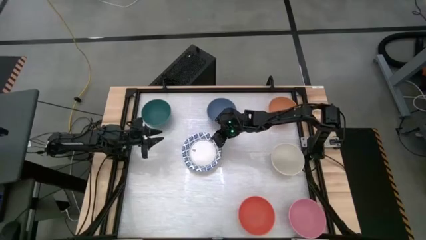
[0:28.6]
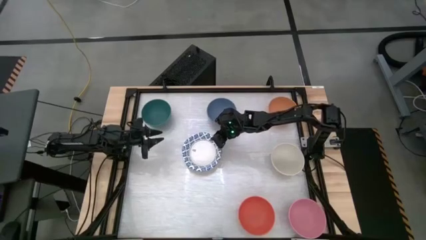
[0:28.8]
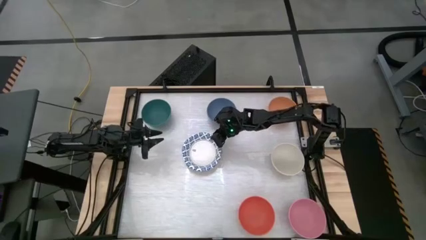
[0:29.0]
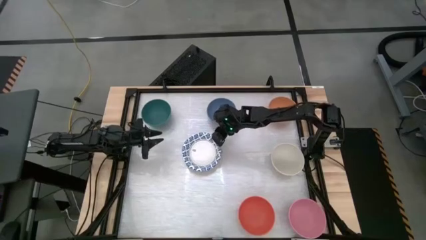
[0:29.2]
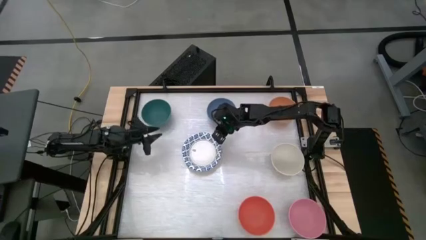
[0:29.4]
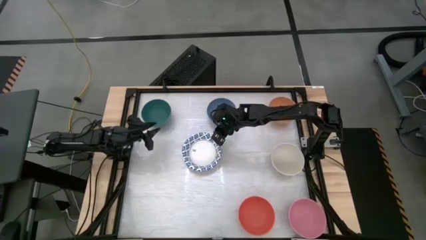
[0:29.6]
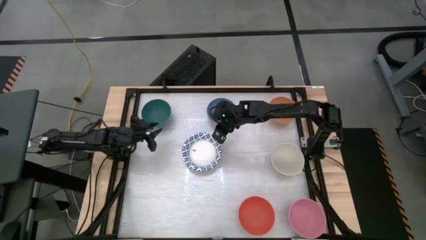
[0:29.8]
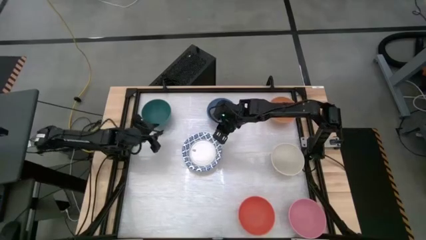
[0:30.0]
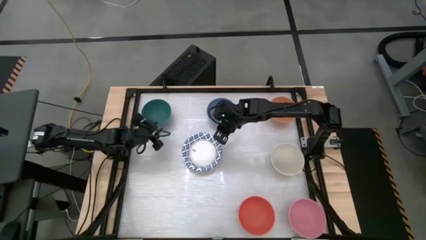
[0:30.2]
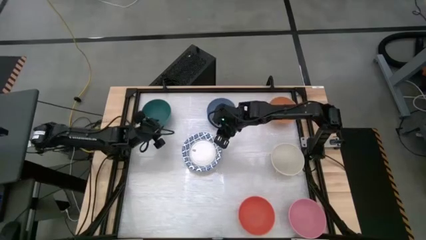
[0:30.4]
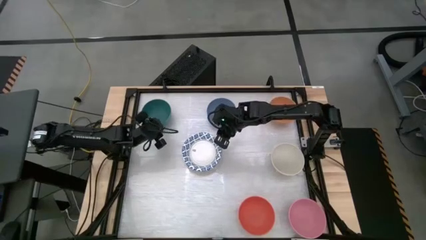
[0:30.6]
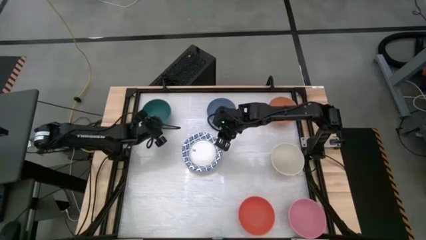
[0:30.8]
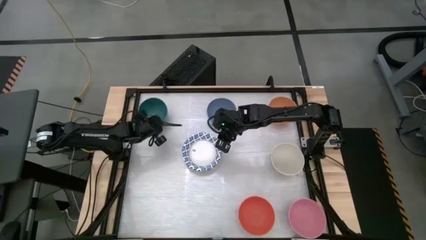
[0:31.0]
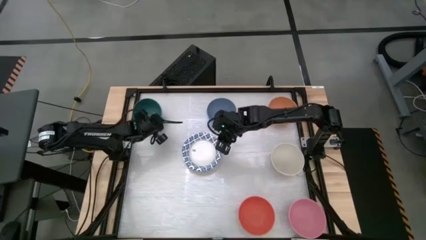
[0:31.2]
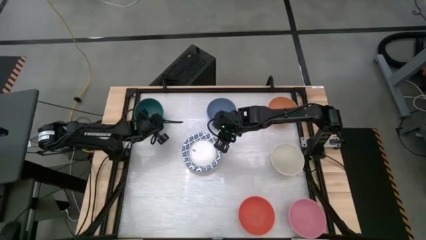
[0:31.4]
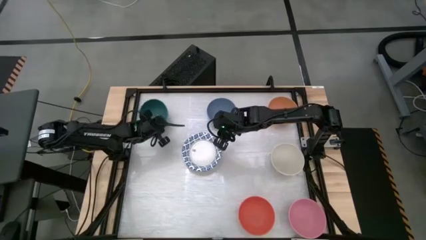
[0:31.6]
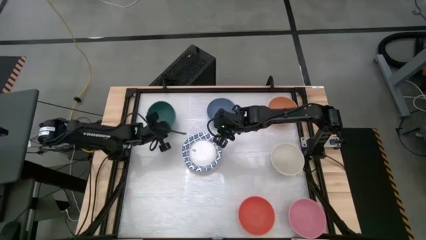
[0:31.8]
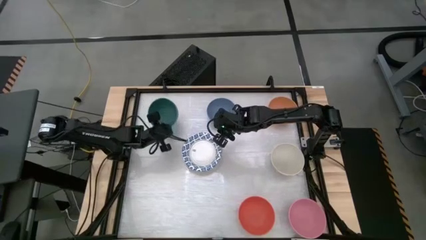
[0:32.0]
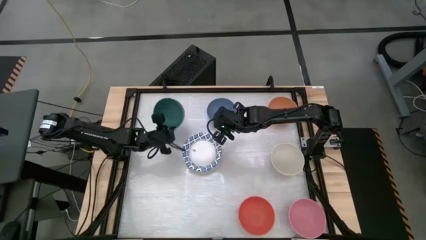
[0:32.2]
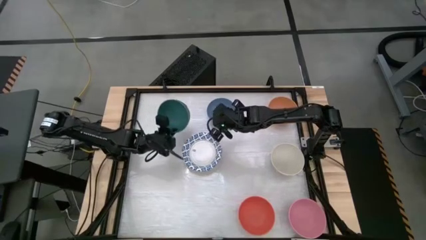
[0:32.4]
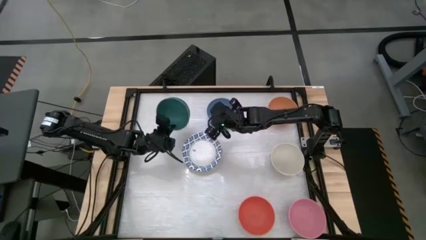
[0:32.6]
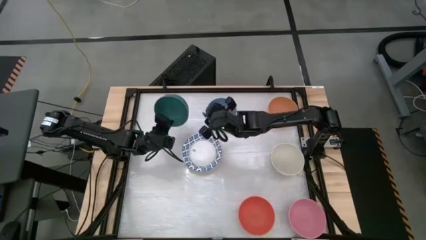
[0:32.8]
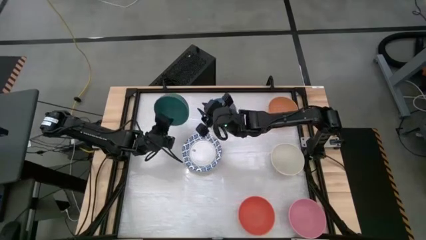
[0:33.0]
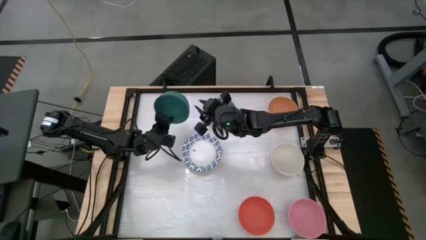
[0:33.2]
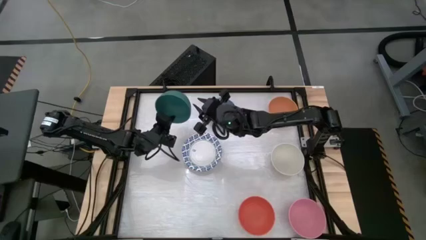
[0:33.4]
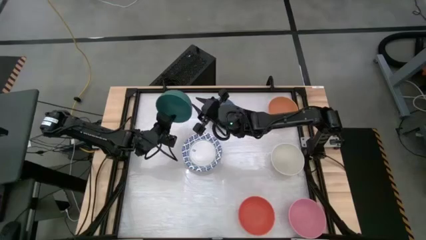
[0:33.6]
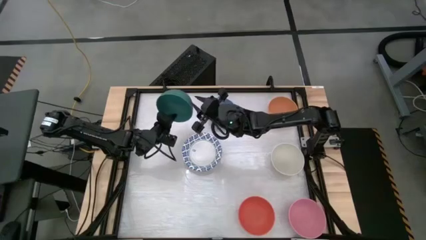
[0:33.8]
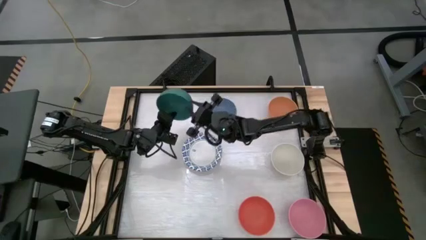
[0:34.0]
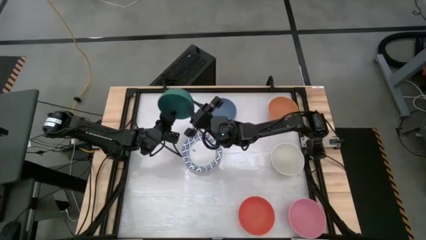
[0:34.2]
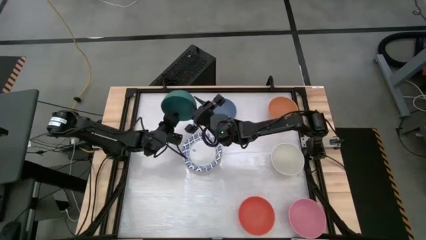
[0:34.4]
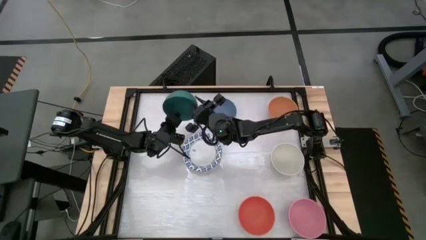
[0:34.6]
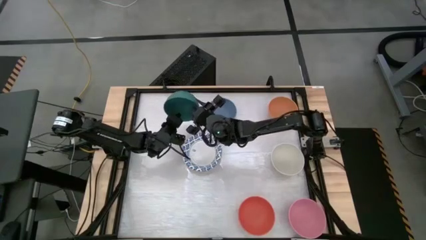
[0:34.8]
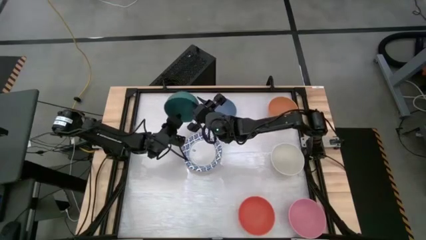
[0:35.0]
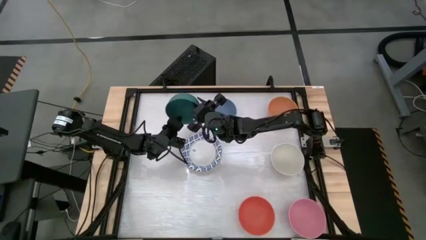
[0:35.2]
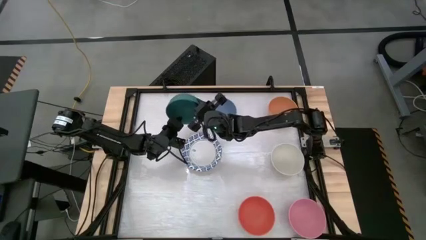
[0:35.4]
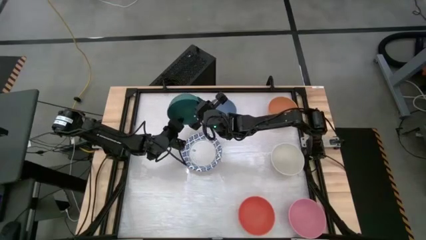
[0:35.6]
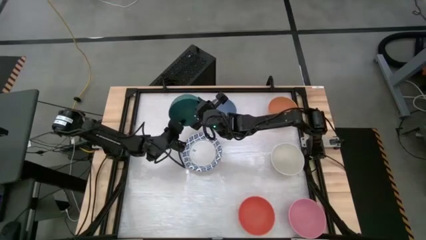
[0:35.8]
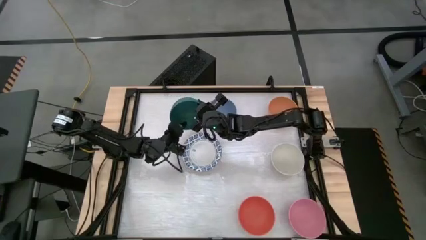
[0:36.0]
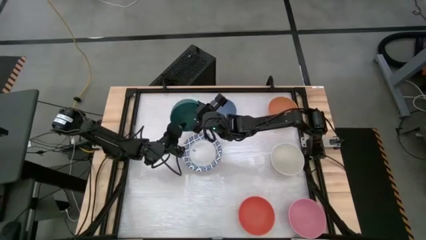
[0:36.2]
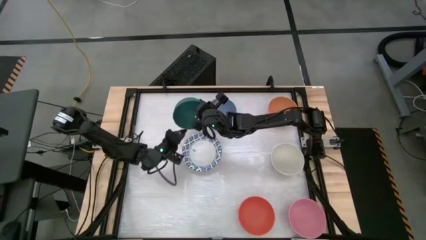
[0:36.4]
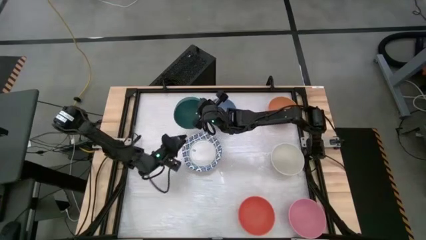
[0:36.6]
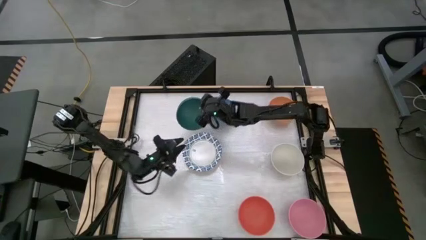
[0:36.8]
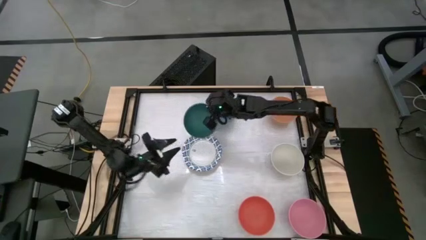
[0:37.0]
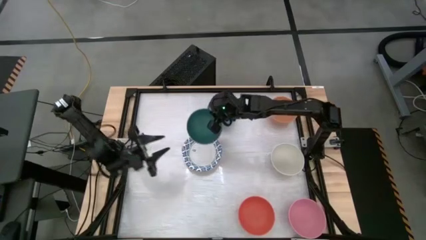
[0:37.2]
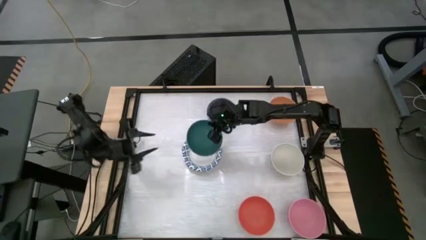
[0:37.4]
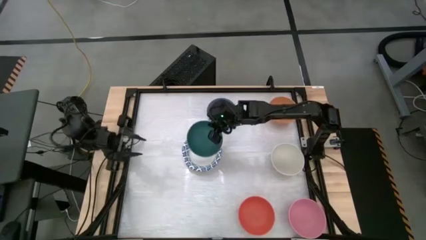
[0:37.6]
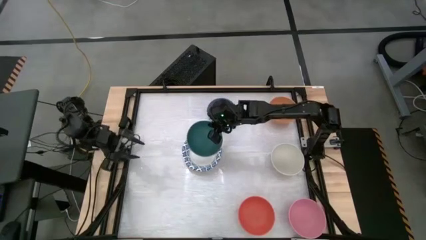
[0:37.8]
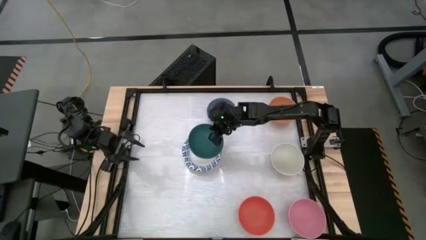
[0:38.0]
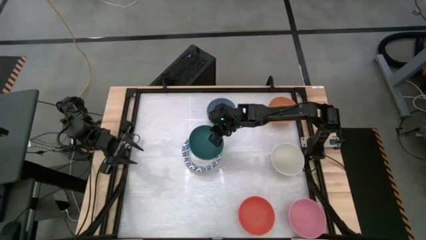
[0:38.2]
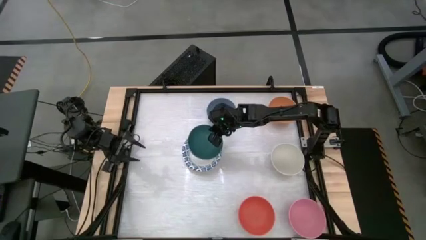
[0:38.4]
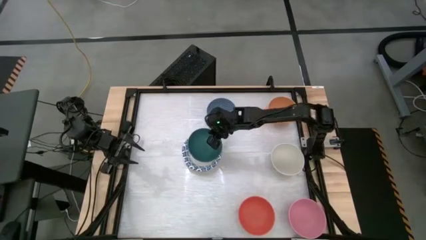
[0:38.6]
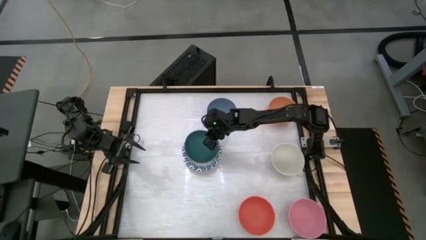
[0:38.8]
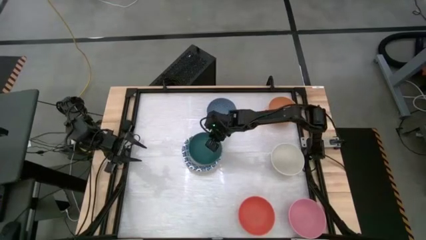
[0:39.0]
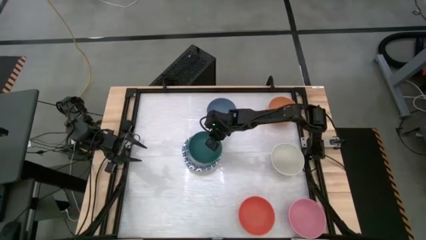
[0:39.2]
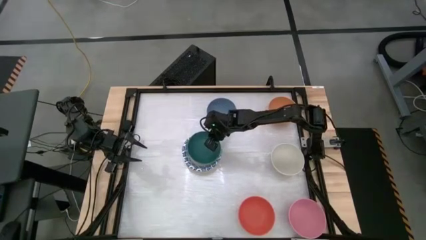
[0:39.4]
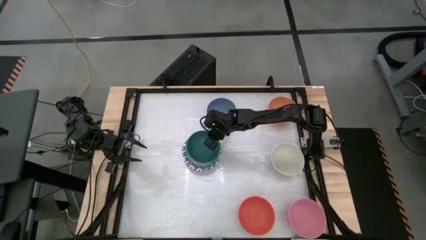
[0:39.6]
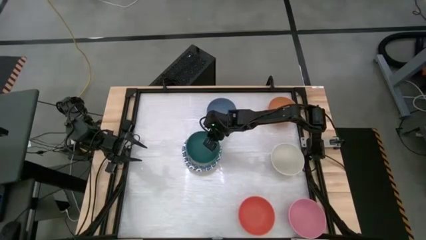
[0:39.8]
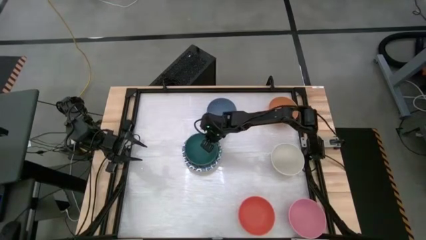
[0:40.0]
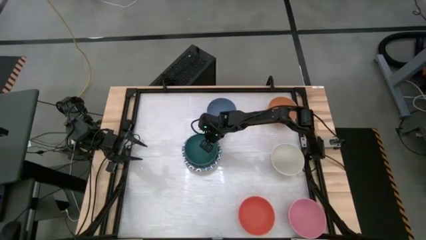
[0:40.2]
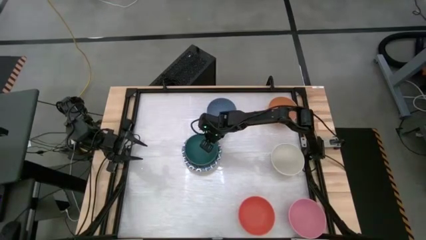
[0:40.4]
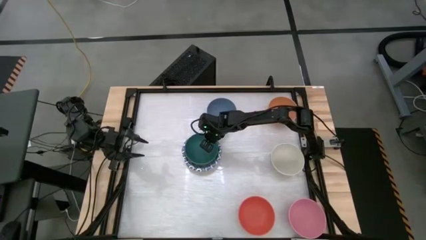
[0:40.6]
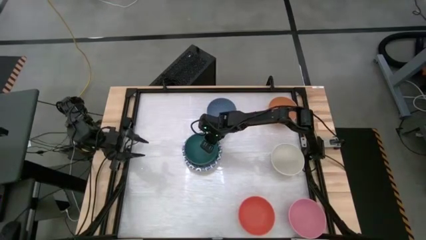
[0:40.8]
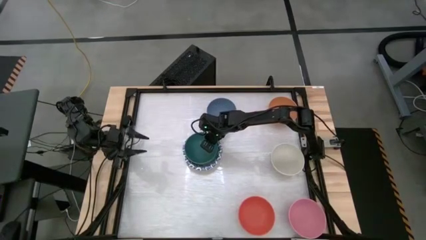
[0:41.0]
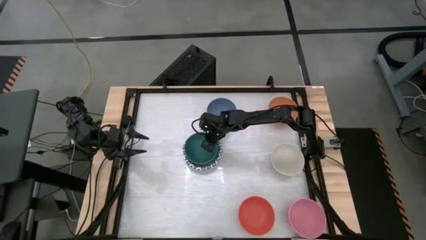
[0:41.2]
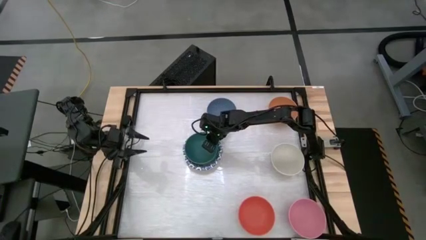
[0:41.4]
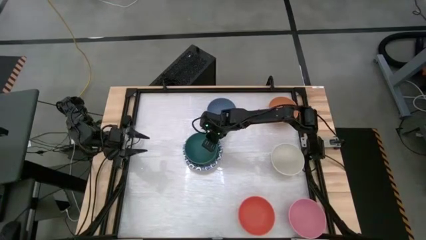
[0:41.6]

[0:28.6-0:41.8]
Stack the green bowl on top of the blue patterned bowl
